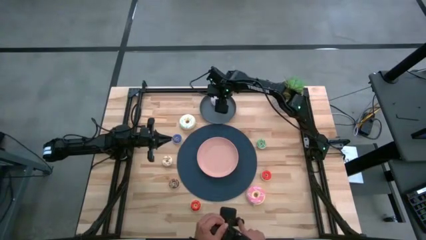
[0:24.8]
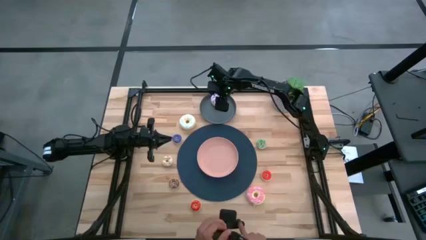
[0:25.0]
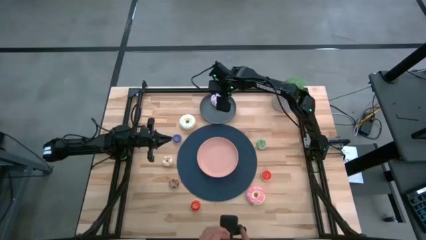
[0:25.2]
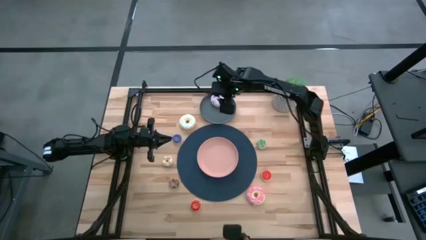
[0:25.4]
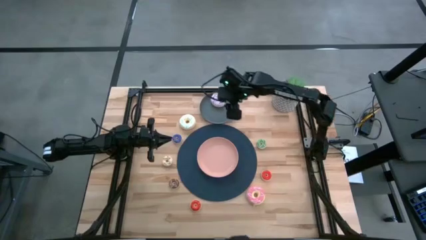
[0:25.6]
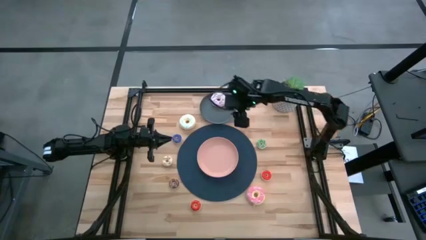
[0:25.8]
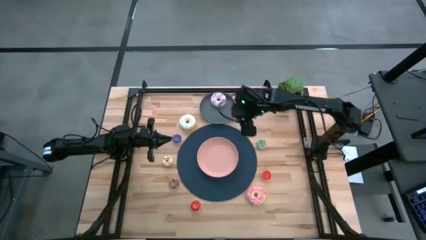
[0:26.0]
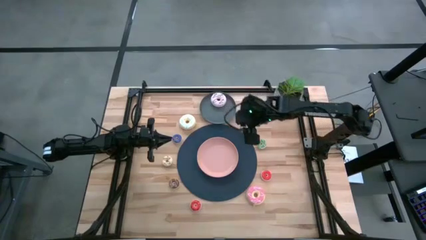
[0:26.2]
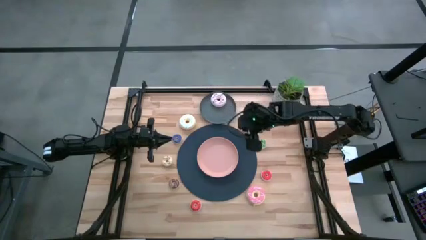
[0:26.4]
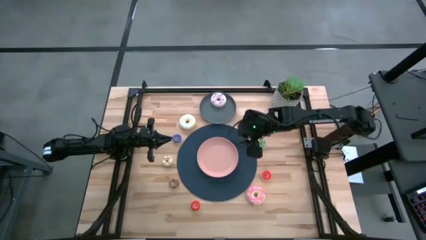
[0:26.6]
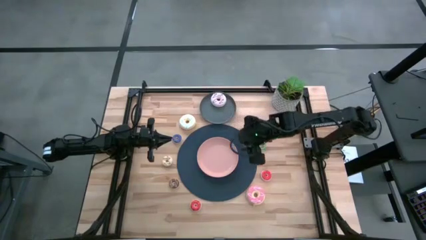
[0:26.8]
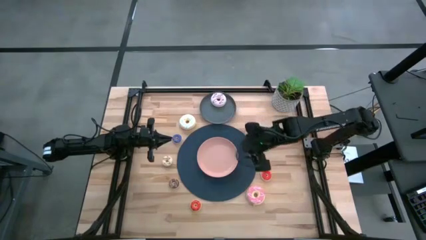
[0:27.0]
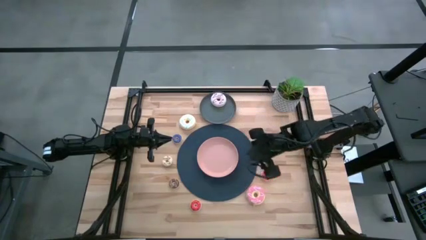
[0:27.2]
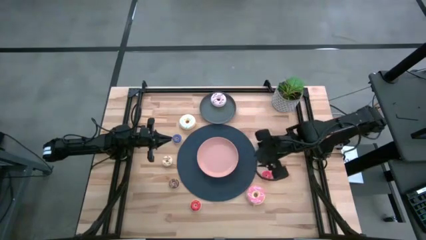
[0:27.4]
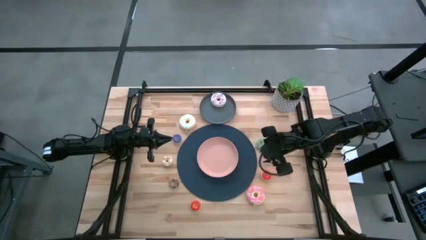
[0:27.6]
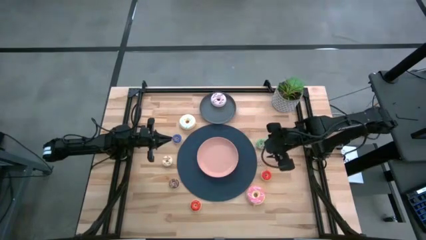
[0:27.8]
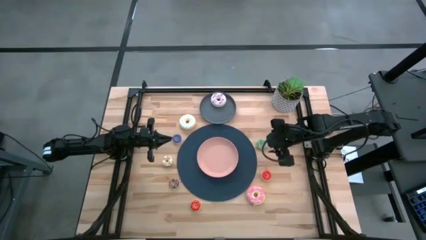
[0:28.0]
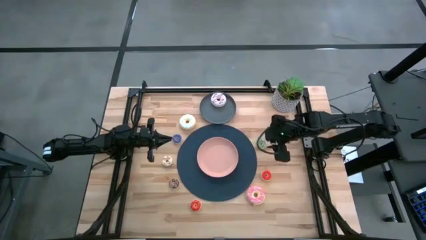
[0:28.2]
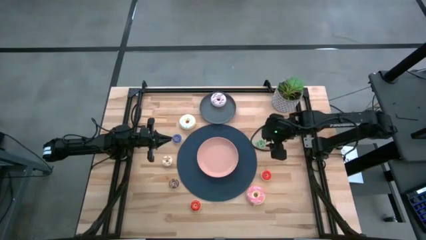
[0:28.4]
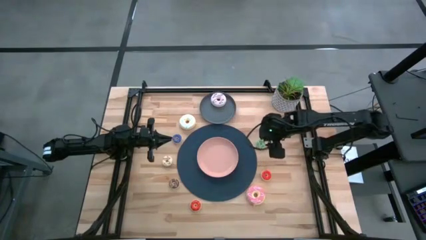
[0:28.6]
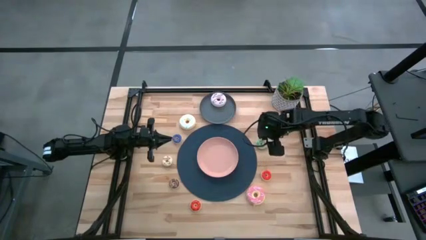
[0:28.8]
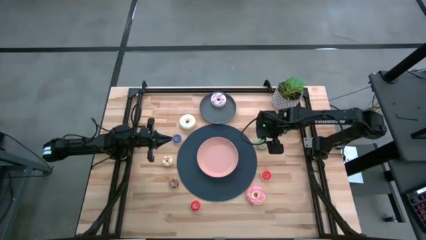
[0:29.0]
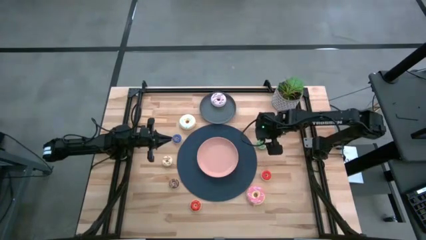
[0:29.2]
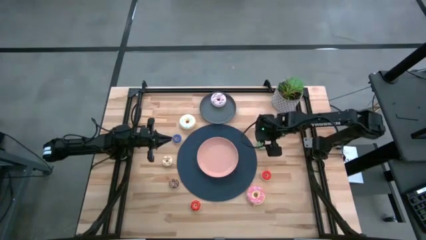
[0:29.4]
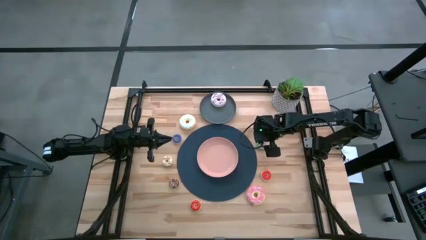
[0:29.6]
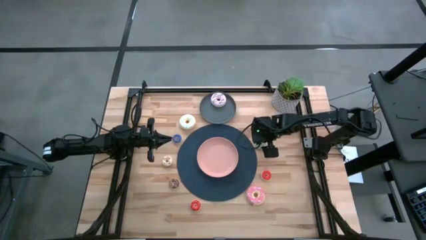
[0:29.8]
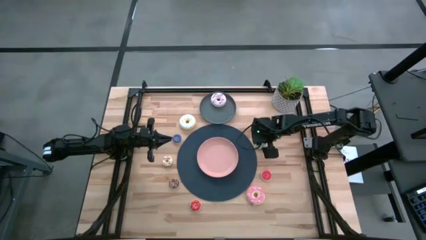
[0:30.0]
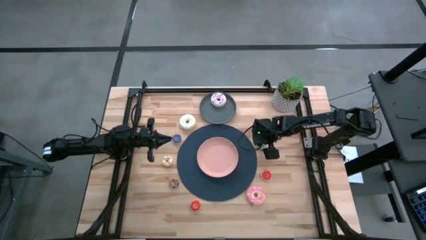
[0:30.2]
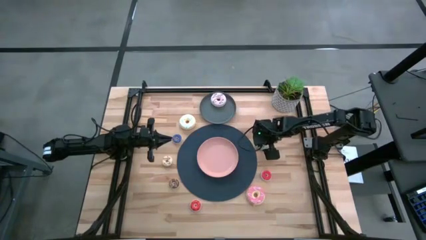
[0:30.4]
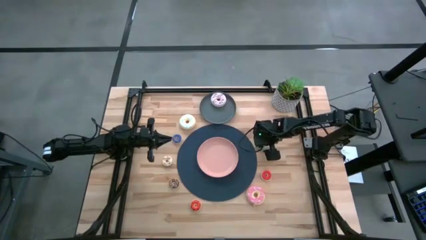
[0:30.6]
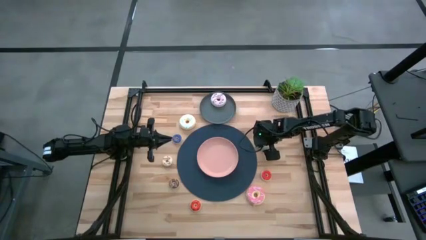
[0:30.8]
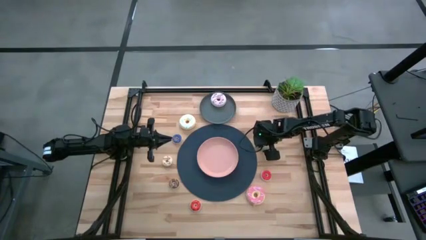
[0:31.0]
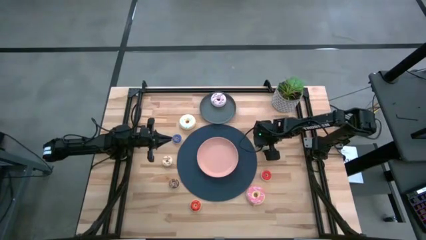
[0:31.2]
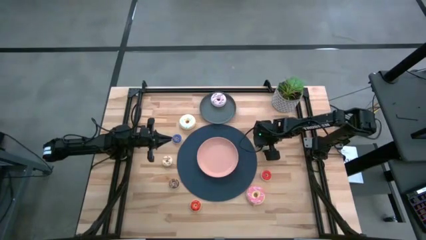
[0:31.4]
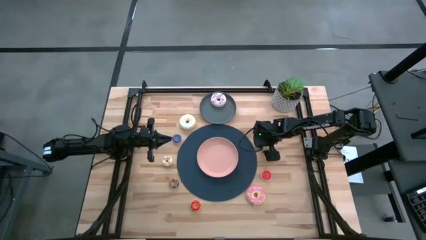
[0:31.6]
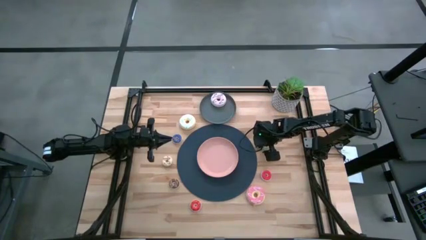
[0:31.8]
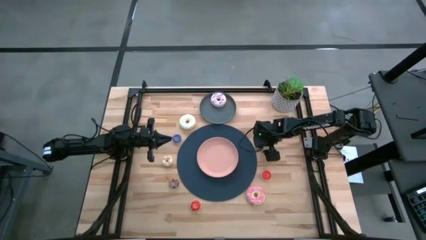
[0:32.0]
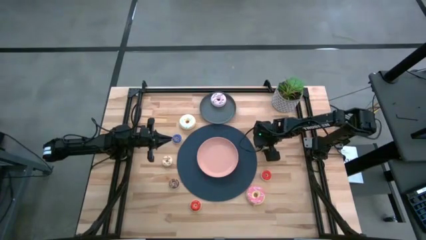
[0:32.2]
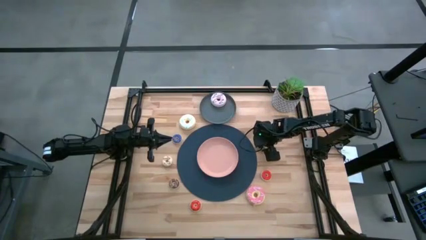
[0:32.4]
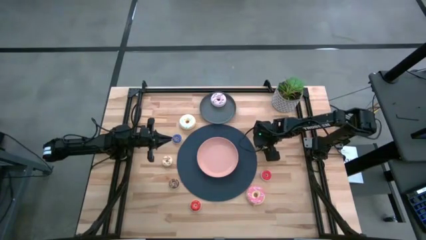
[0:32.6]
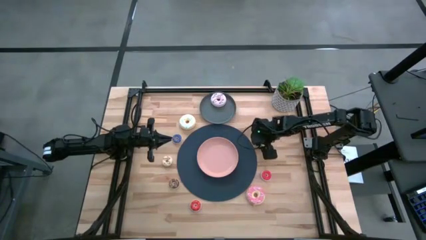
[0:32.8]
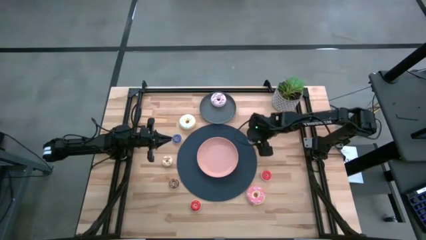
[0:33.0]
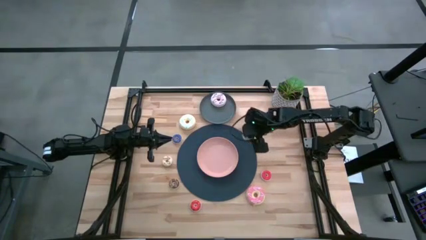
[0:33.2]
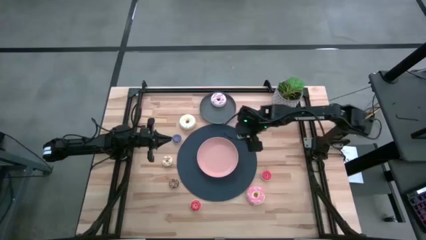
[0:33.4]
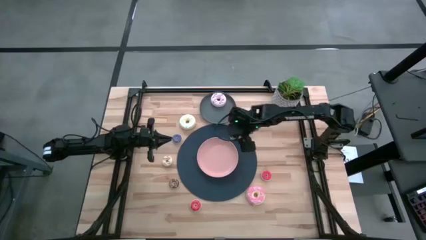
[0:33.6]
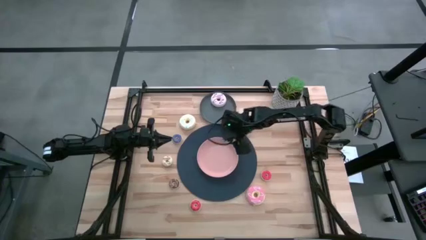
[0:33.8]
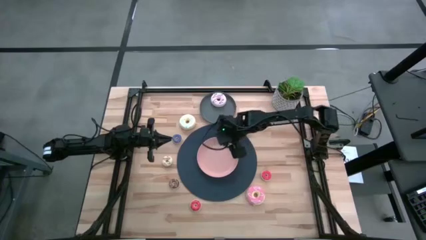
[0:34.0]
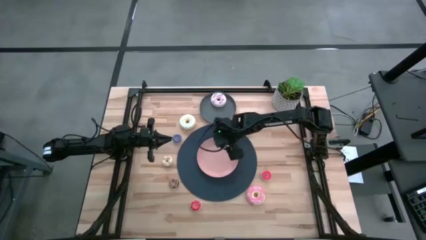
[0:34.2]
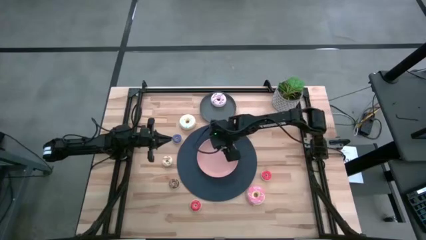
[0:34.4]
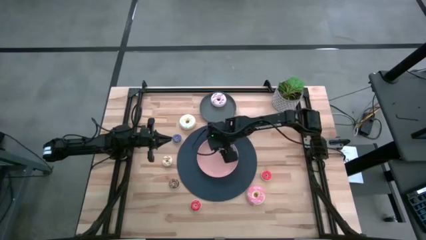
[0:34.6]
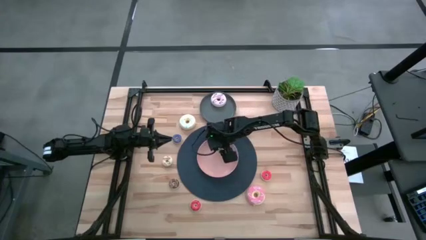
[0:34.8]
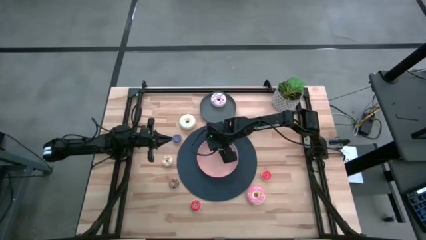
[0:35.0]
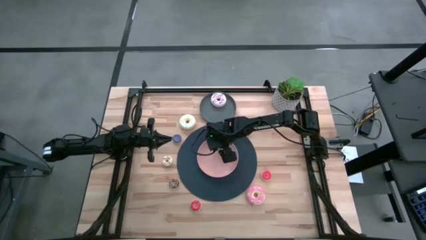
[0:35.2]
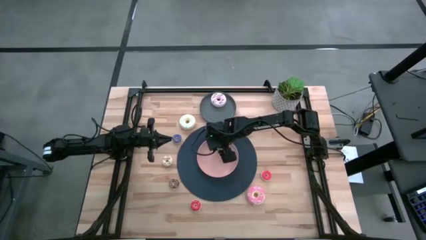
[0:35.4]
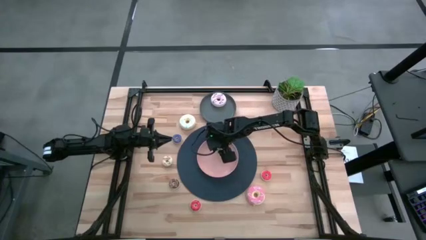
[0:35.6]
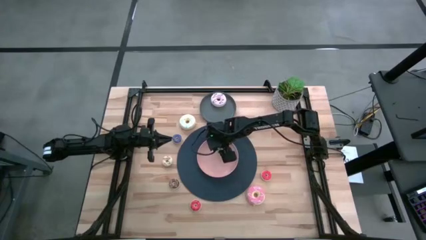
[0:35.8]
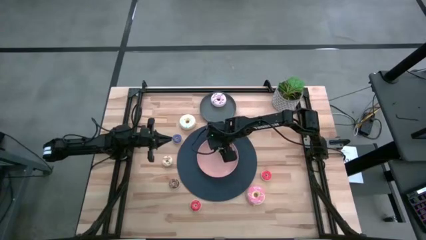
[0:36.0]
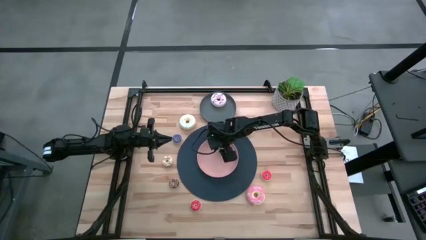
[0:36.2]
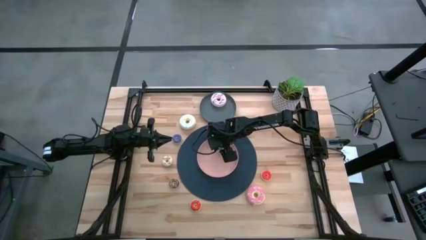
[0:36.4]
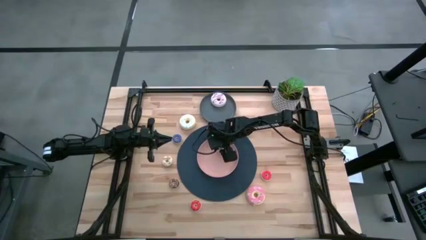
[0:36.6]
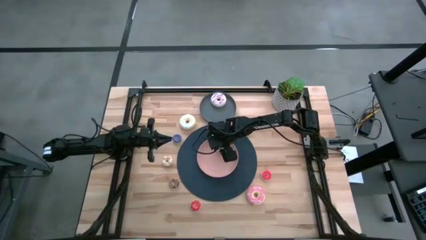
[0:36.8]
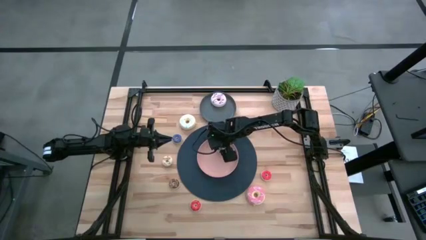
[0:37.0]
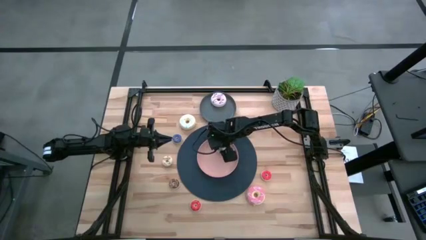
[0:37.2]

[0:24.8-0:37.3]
Task: Pick & Place donuts
Put the small green donut on the pink plate

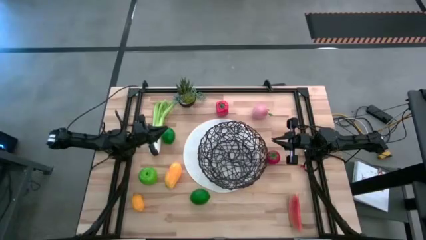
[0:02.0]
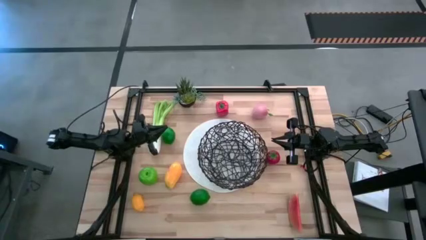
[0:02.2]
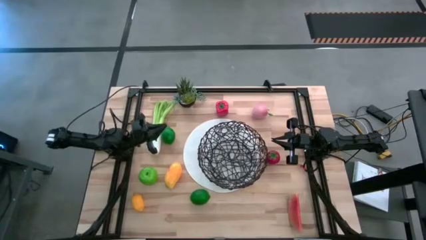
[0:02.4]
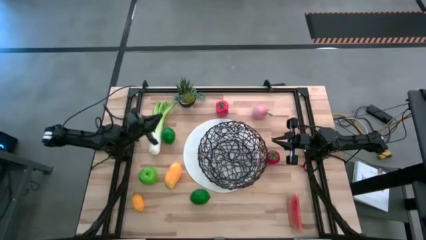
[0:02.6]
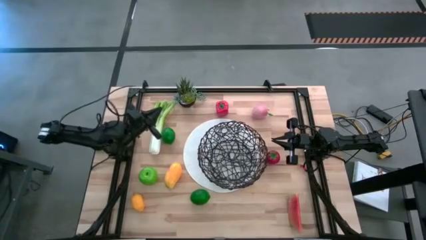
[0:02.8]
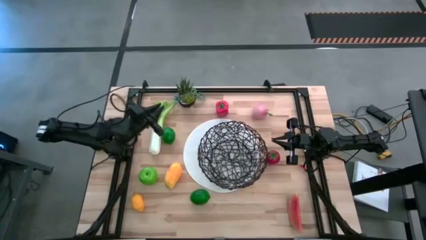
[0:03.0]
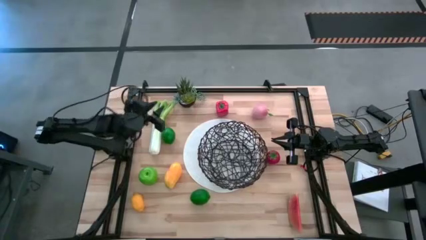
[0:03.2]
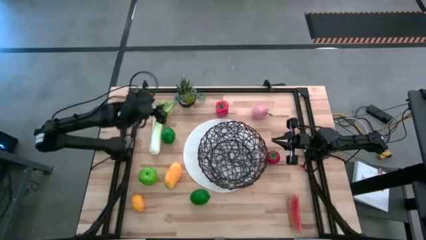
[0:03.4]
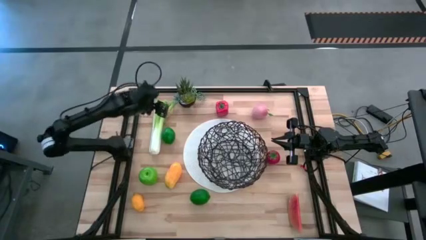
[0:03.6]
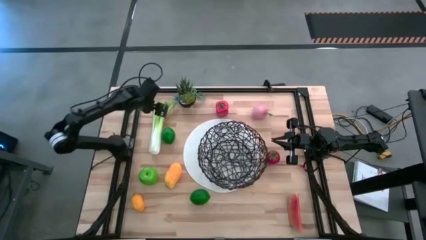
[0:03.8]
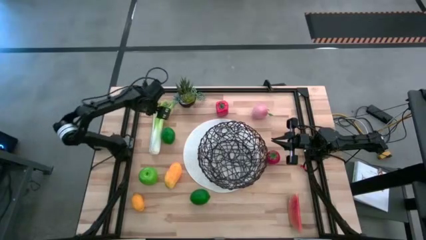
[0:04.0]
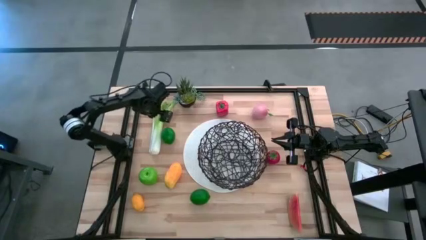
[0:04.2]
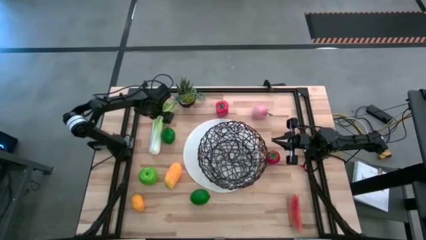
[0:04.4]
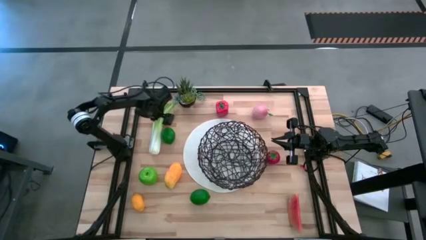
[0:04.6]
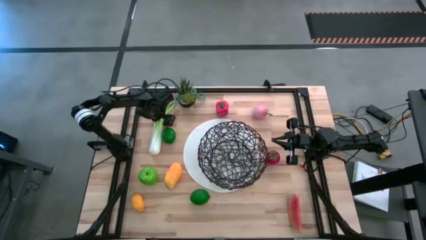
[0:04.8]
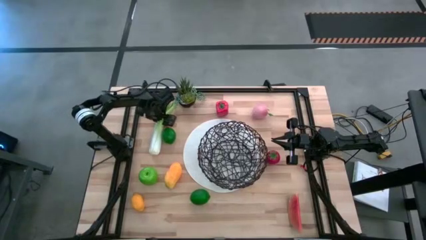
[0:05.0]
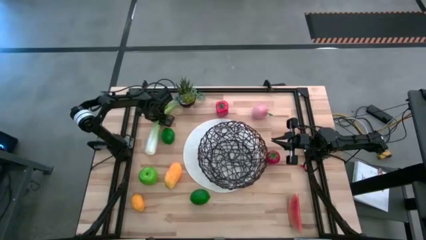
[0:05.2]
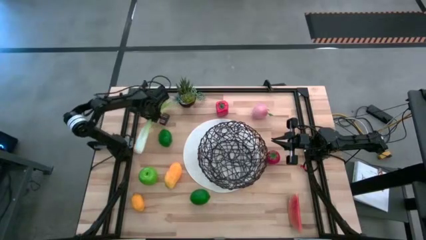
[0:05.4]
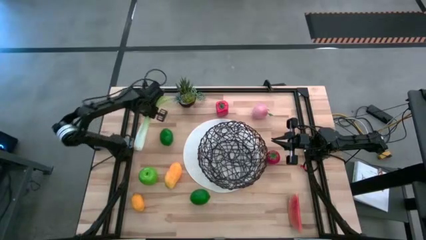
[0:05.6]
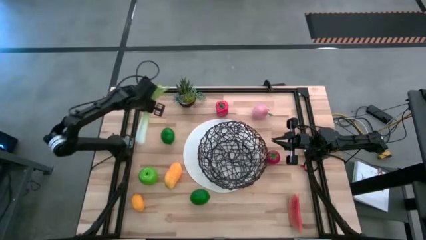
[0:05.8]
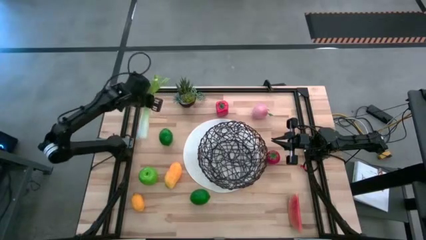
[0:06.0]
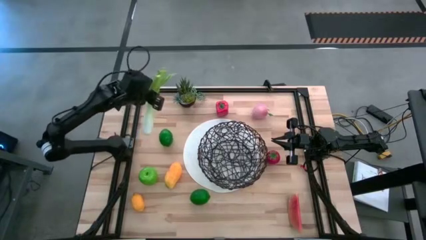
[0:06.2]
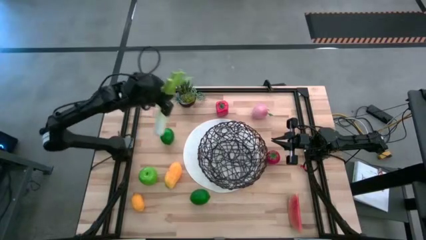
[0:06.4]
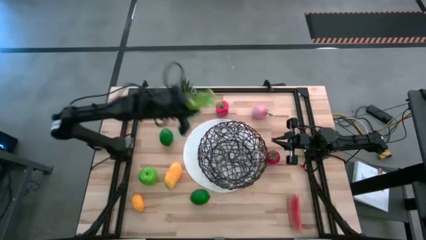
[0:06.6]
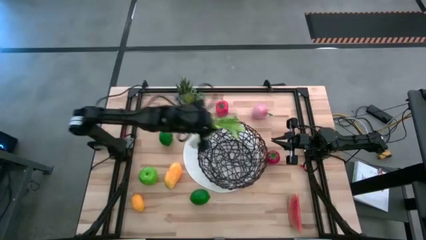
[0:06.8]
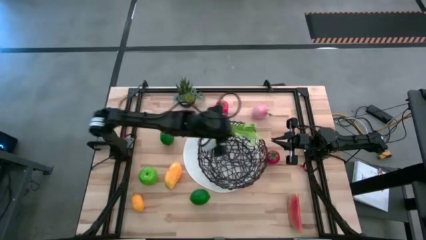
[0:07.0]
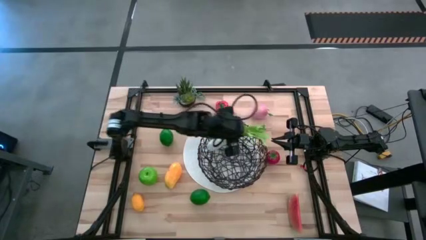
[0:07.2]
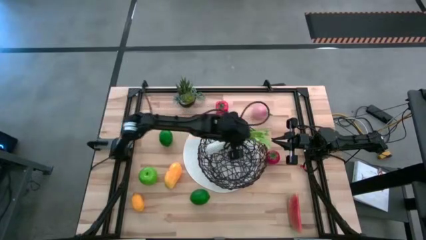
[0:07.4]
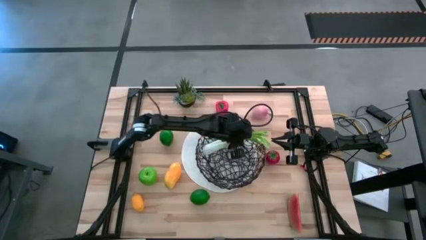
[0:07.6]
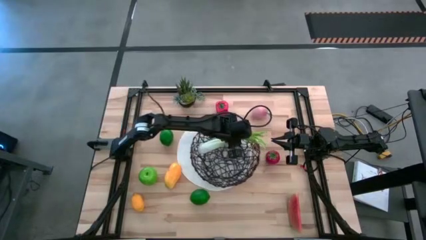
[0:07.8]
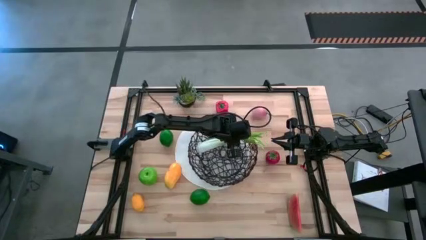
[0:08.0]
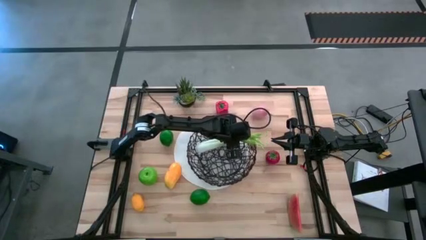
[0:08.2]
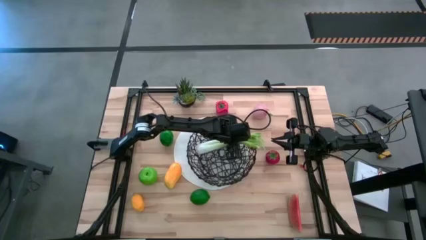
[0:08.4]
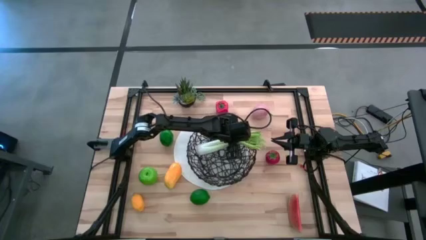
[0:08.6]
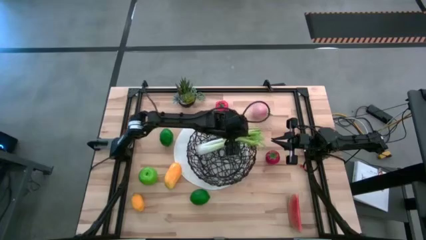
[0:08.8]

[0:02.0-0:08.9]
Task: Build produce basket
Put the green celery into the wire basket
